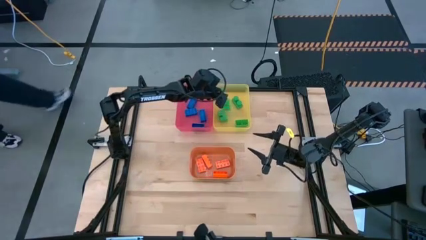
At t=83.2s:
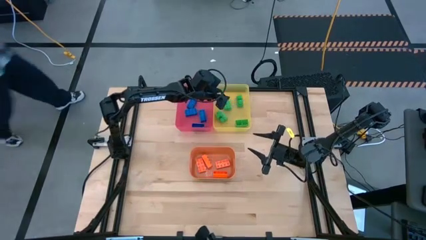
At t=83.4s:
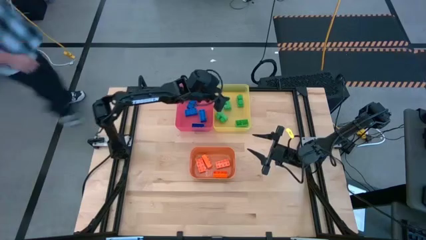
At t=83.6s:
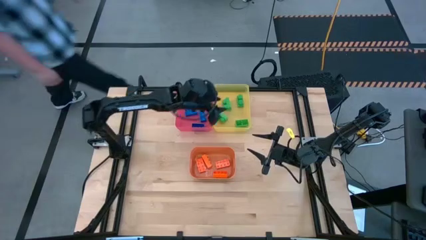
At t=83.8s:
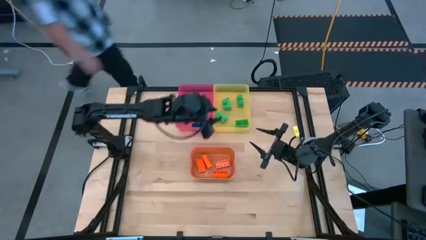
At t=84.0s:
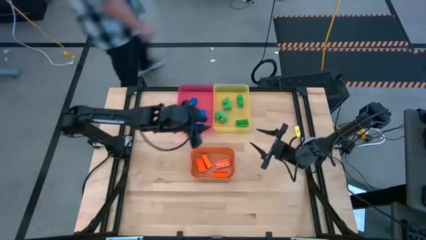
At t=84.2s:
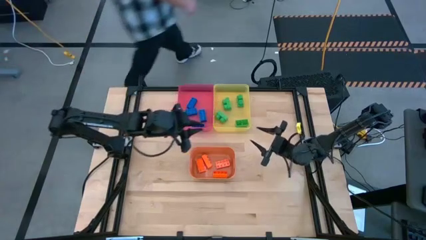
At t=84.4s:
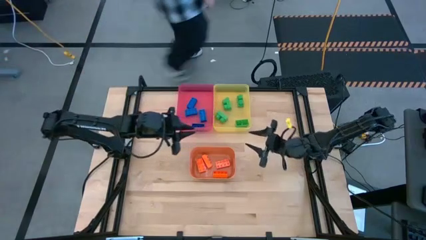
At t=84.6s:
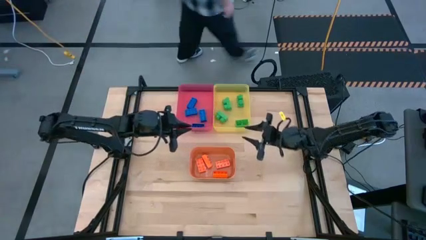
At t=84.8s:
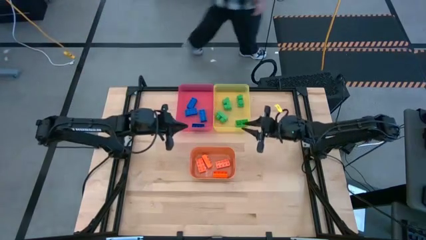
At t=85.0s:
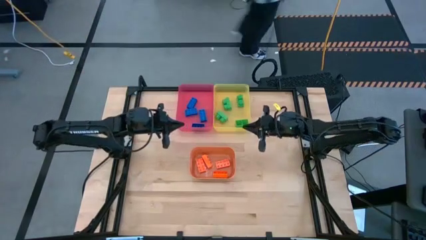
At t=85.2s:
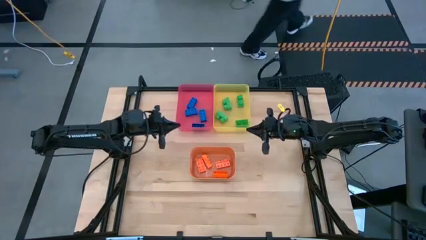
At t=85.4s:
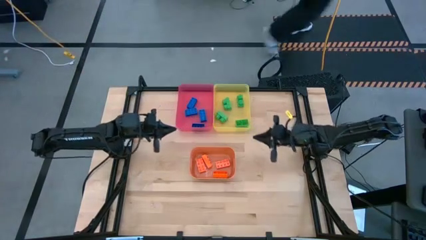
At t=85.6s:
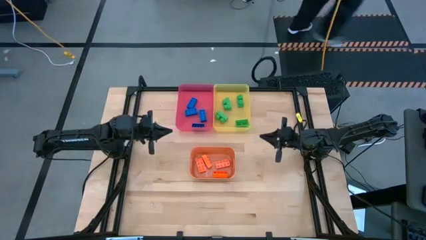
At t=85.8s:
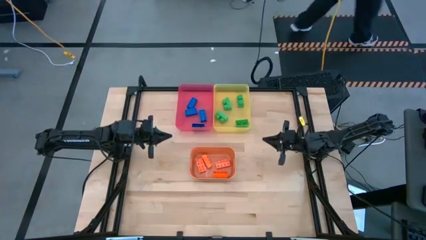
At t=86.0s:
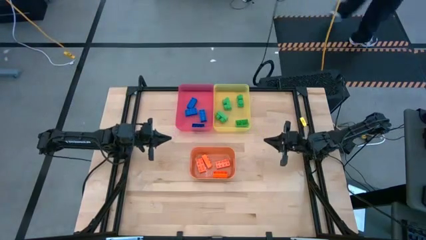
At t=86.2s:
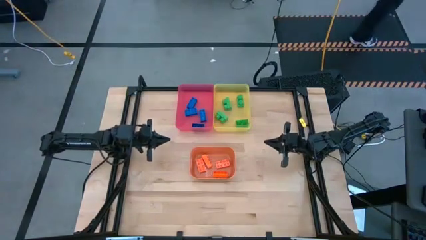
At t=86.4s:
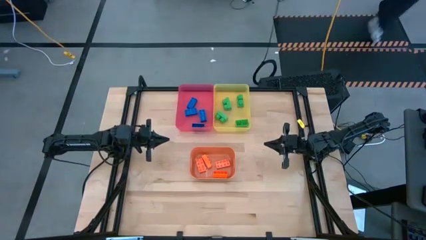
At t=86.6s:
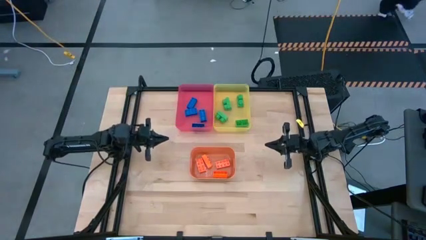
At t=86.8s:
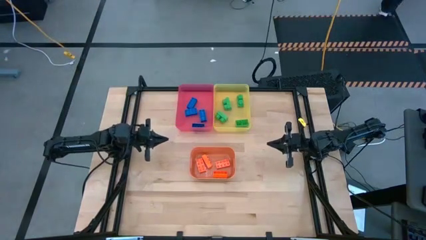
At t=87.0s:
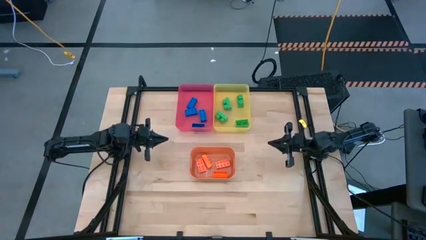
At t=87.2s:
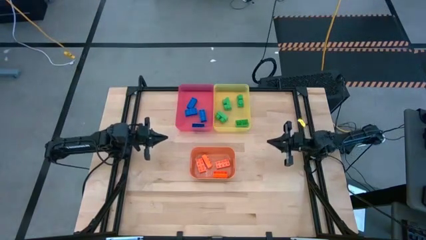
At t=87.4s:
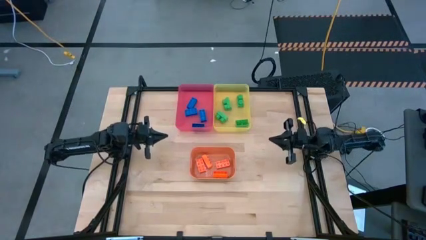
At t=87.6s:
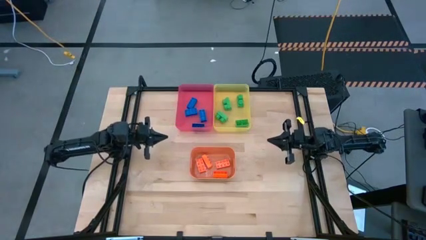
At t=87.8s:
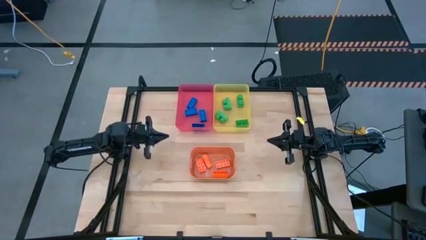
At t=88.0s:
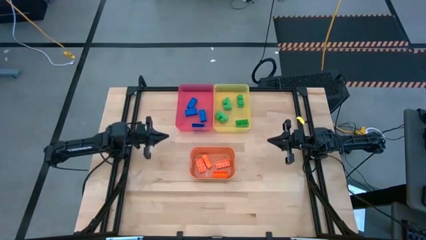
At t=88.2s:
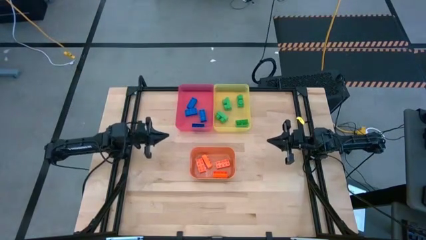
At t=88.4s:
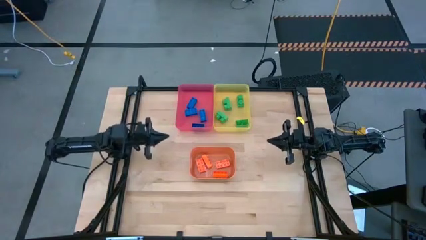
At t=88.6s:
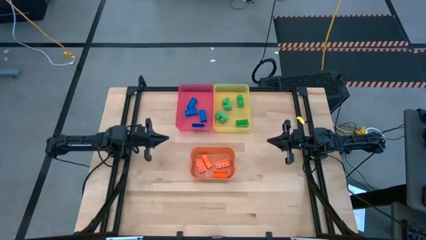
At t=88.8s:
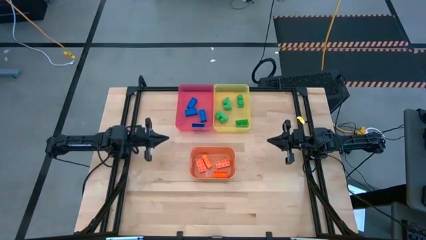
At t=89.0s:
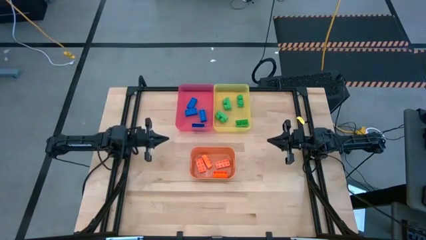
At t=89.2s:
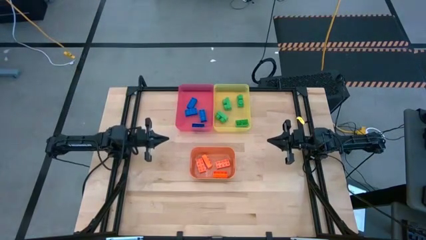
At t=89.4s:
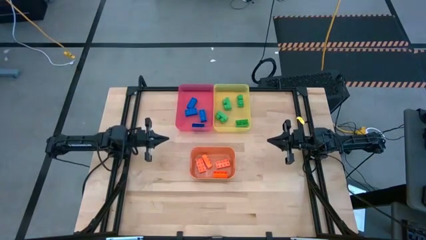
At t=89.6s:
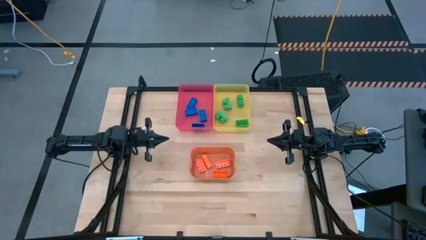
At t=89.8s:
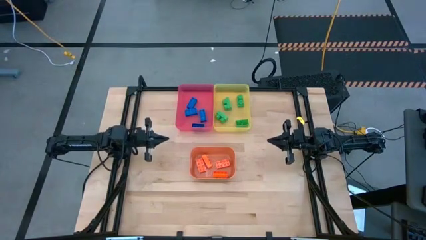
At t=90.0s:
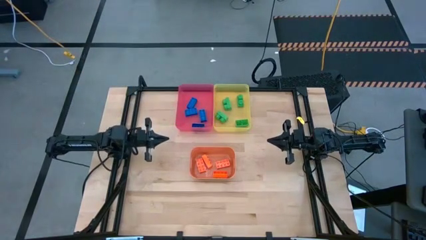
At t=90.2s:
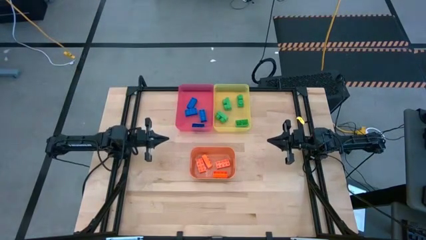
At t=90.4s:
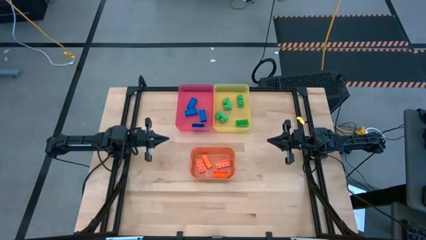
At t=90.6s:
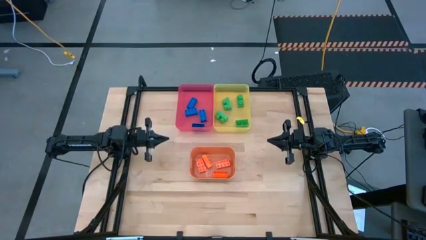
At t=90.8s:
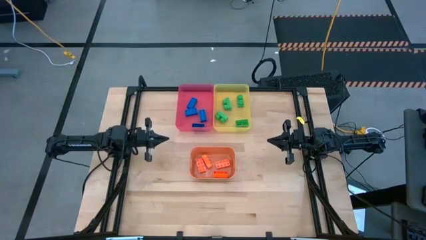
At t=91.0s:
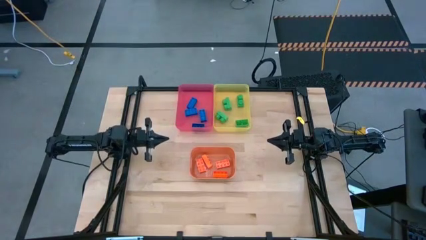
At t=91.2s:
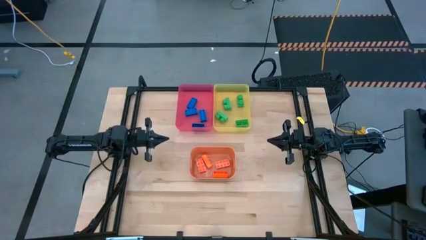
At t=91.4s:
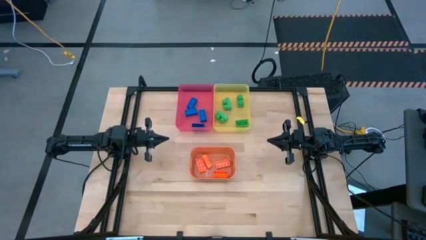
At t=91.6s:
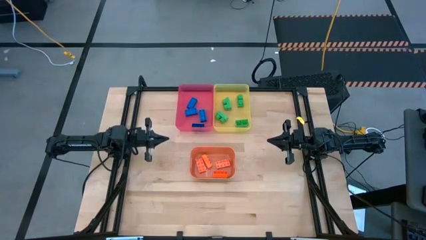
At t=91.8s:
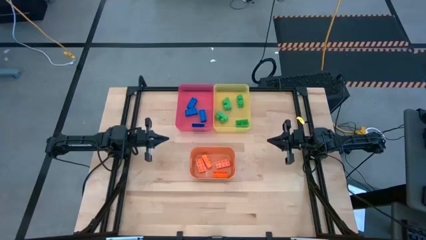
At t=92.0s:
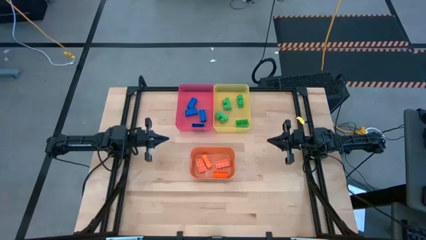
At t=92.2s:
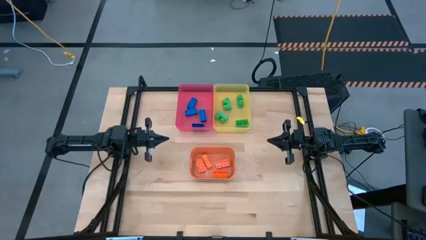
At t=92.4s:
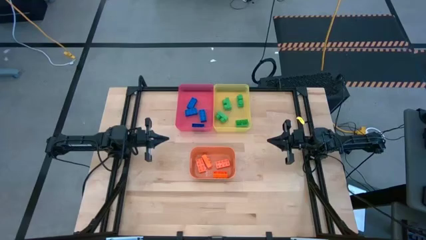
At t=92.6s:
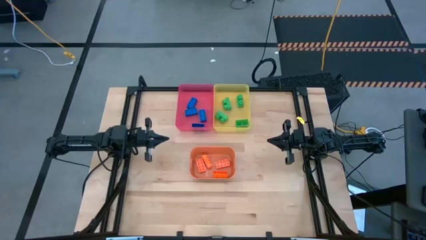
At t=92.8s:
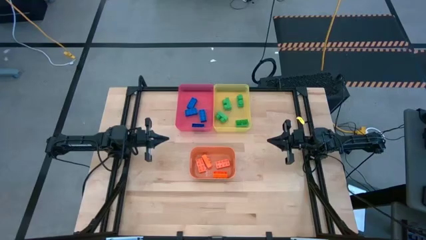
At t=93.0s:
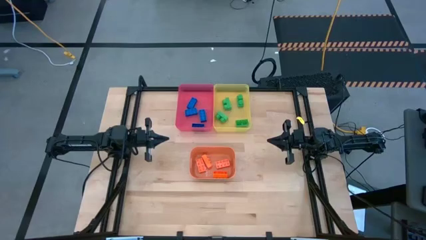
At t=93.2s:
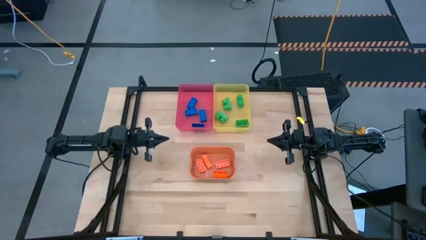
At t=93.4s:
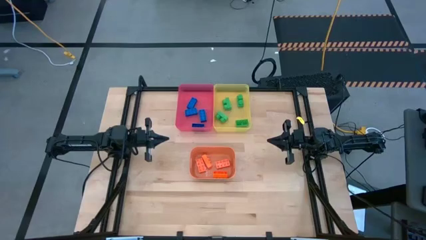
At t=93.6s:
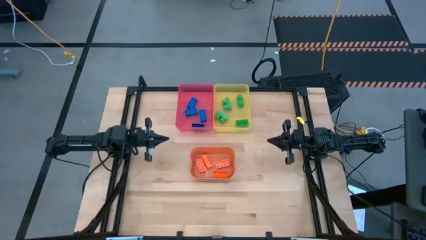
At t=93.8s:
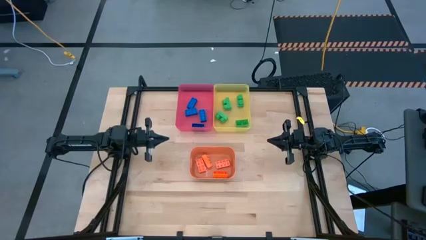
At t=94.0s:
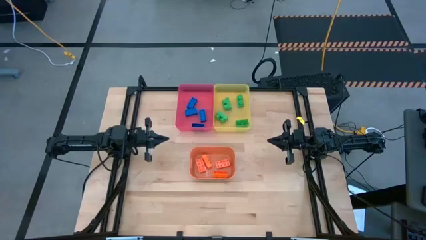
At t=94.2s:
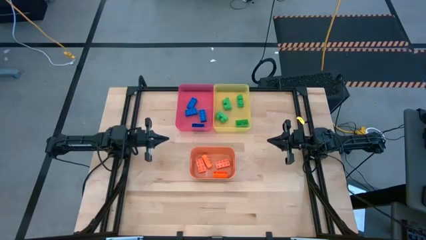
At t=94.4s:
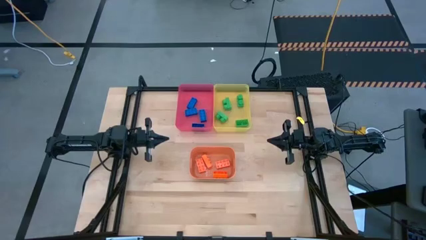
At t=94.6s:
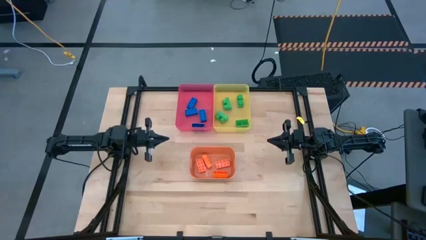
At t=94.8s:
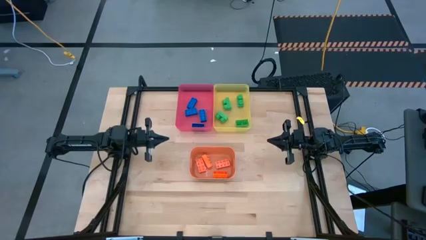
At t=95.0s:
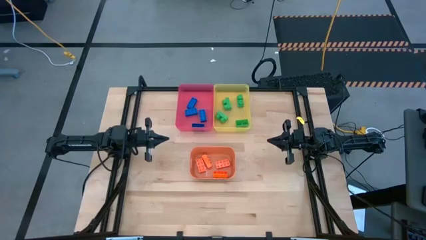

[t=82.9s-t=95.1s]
Task: Sort & place blocks by color
Return to Home Position

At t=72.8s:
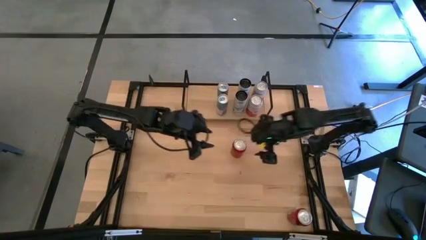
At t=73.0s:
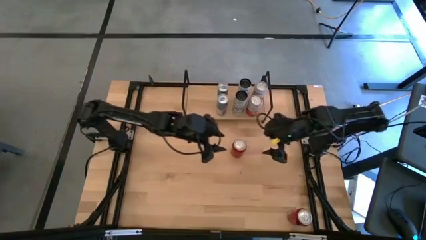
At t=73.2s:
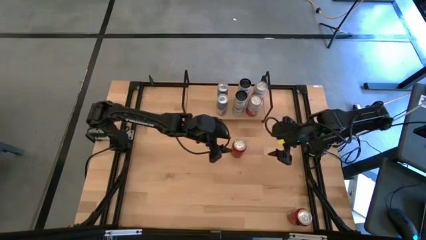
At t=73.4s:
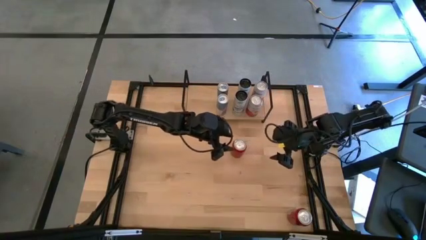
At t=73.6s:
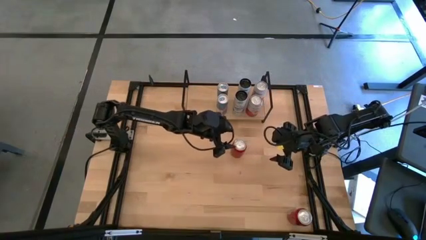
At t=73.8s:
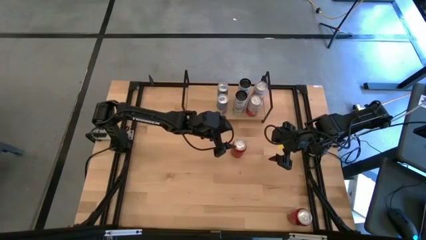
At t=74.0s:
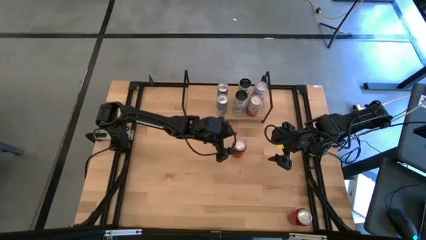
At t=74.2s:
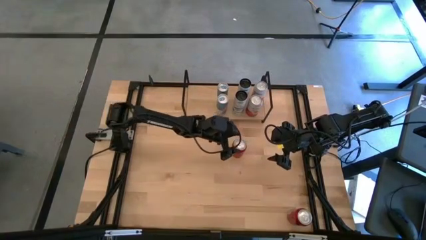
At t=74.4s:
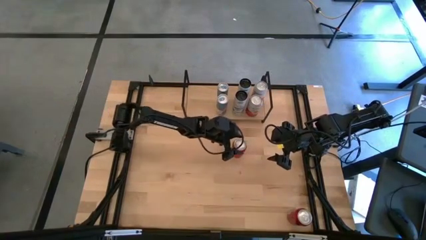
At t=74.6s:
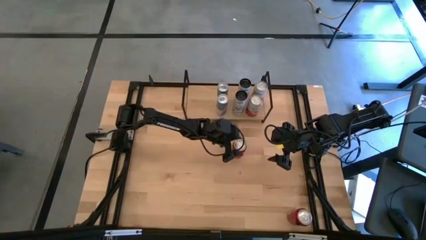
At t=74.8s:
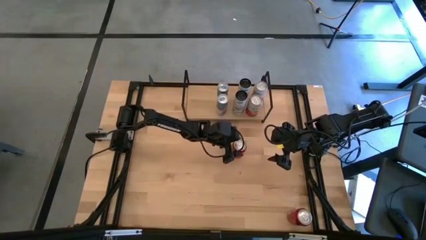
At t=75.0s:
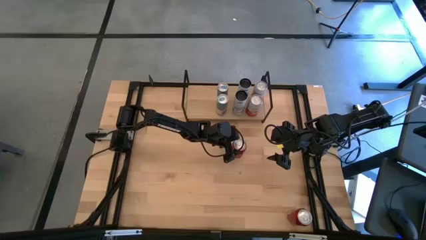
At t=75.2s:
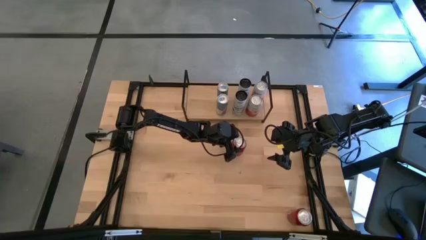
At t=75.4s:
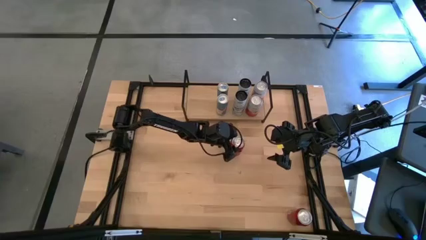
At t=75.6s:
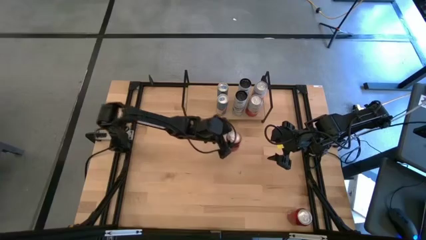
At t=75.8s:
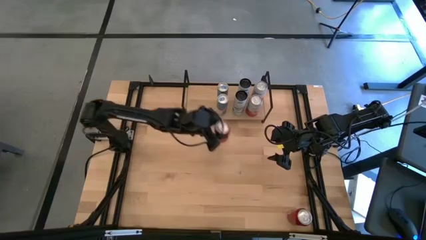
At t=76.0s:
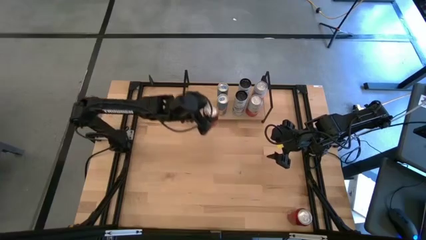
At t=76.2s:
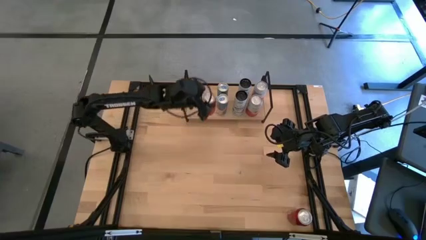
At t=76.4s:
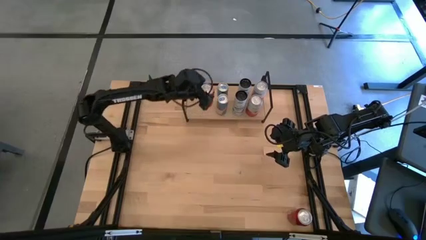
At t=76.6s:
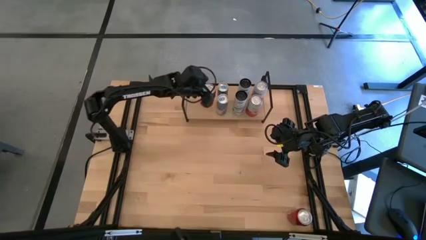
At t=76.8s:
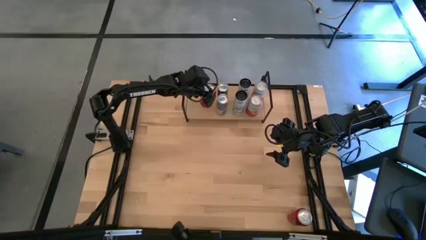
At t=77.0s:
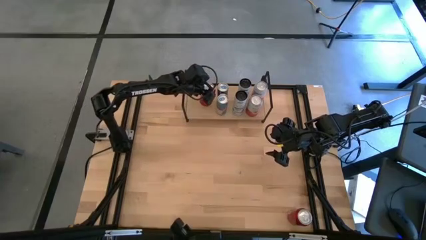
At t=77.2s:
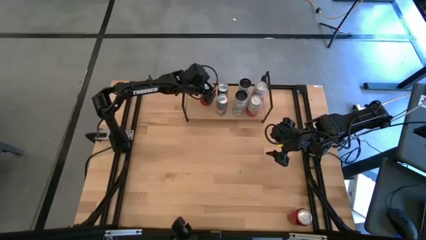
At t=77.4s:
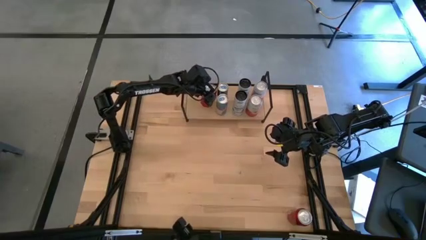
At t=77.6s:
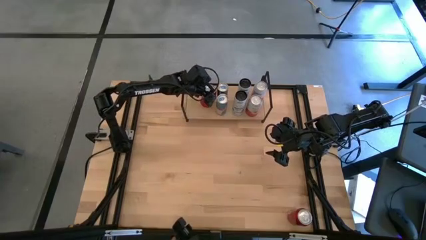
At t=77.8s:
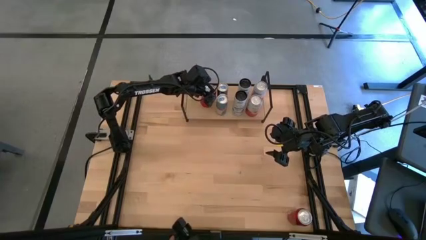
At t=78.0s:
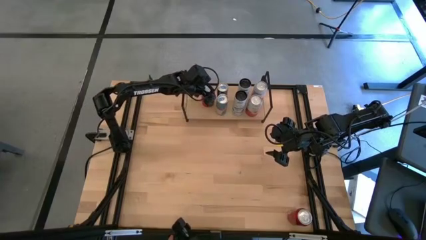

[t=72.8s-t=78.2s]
Task: Place canned beverage on shelf
Put the center red and black soda can on the shelf
